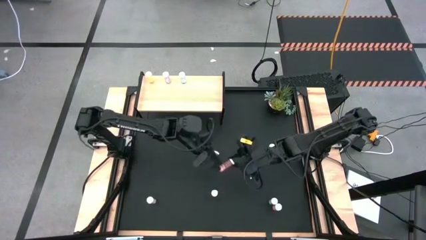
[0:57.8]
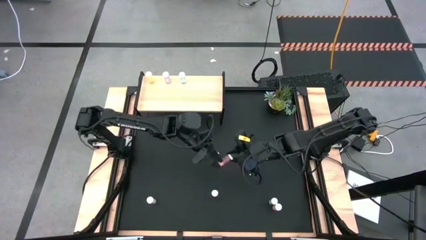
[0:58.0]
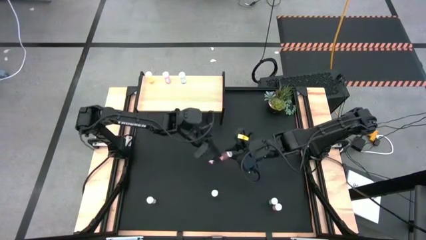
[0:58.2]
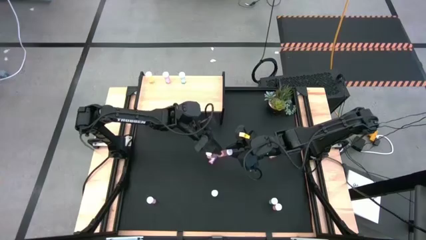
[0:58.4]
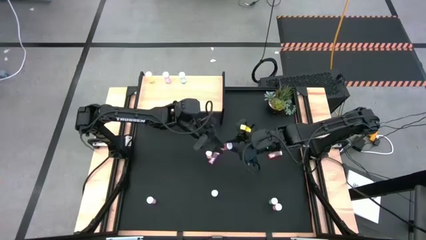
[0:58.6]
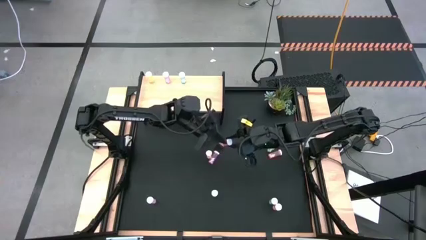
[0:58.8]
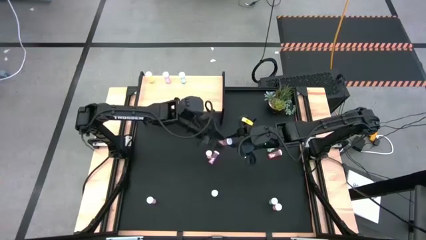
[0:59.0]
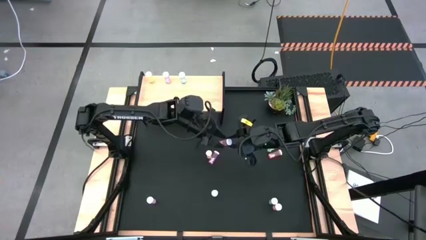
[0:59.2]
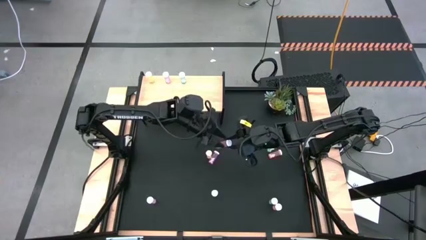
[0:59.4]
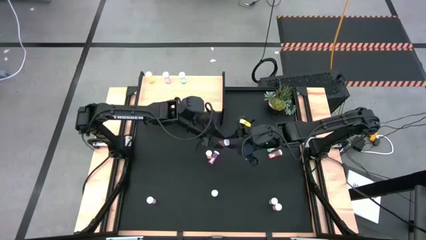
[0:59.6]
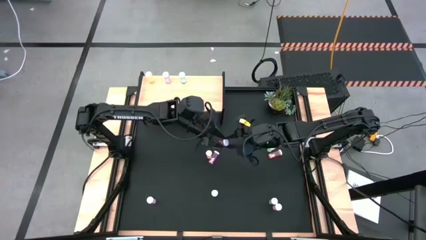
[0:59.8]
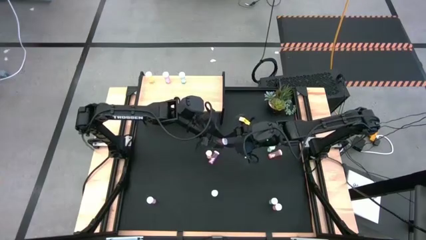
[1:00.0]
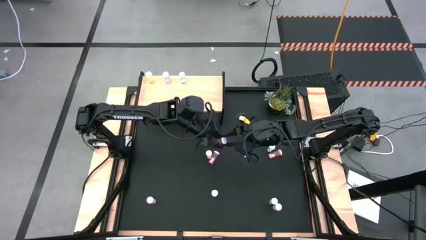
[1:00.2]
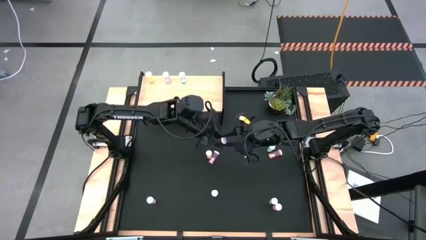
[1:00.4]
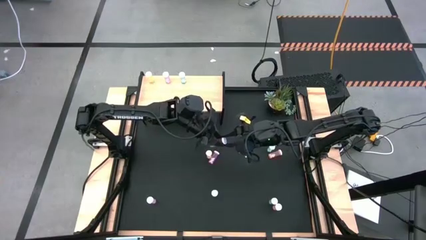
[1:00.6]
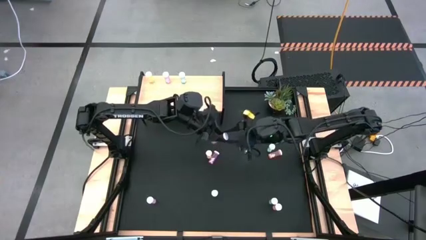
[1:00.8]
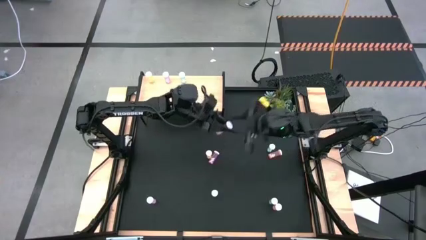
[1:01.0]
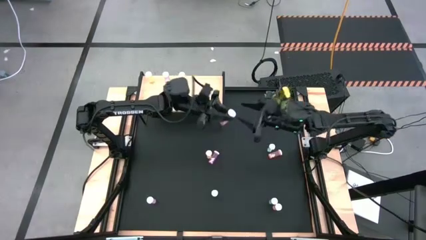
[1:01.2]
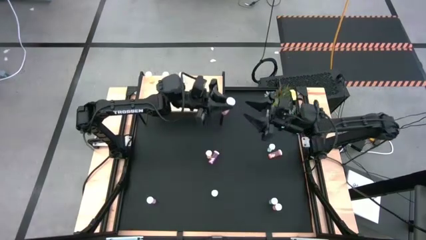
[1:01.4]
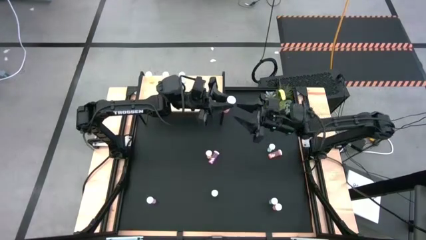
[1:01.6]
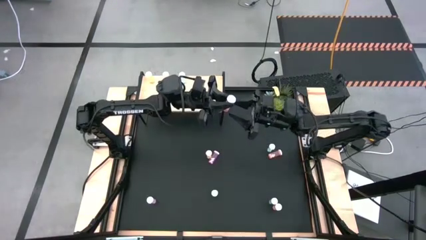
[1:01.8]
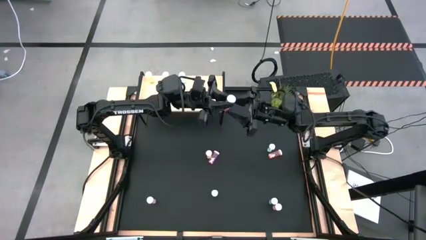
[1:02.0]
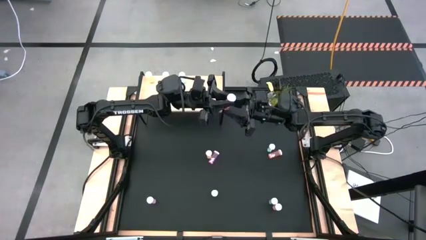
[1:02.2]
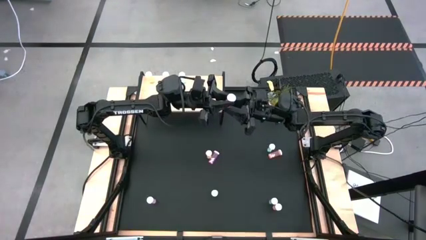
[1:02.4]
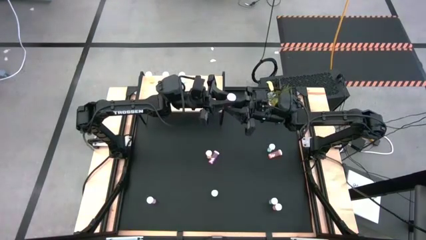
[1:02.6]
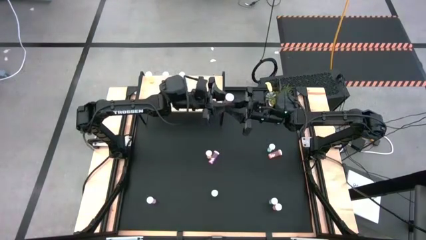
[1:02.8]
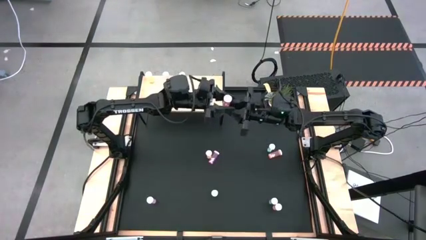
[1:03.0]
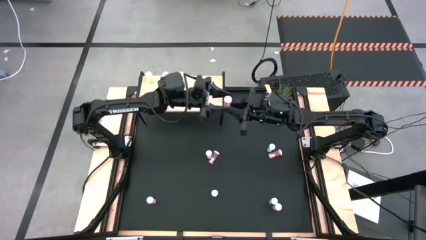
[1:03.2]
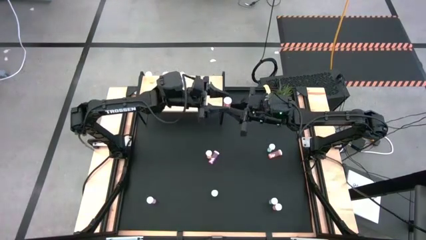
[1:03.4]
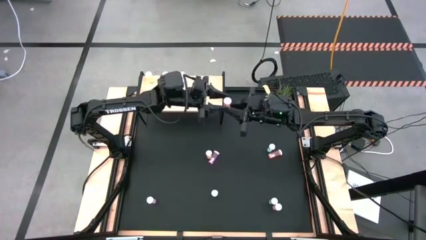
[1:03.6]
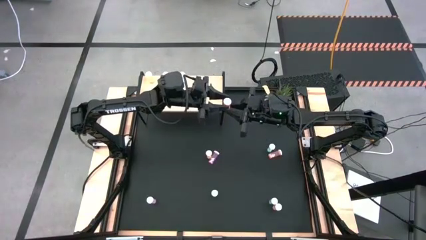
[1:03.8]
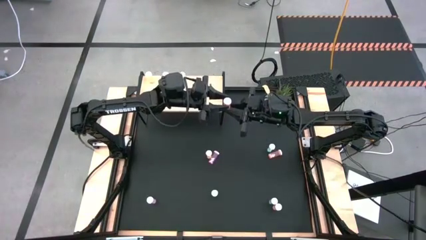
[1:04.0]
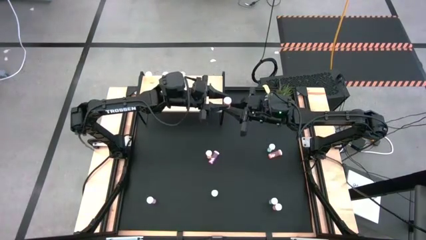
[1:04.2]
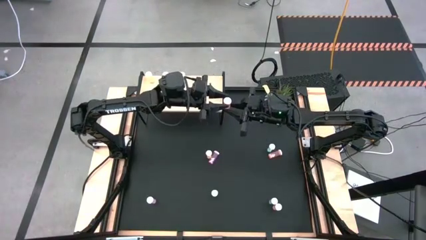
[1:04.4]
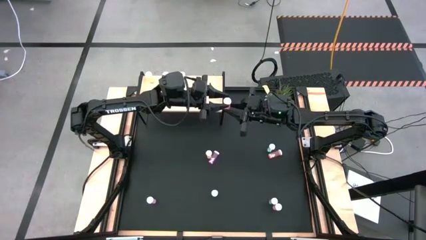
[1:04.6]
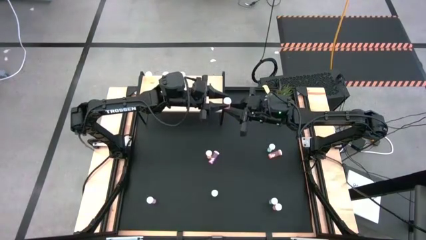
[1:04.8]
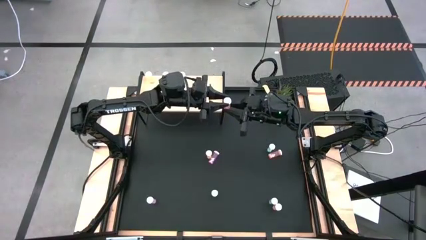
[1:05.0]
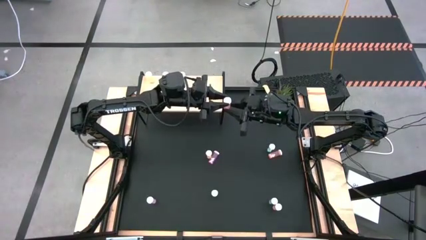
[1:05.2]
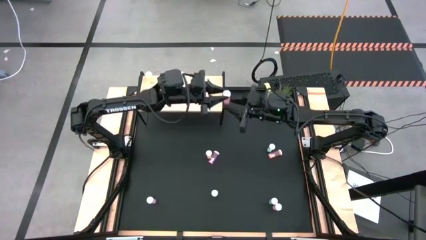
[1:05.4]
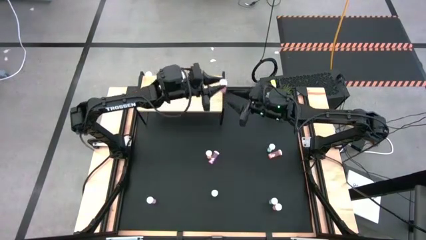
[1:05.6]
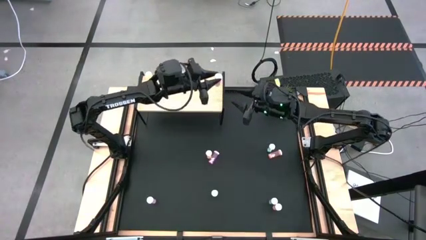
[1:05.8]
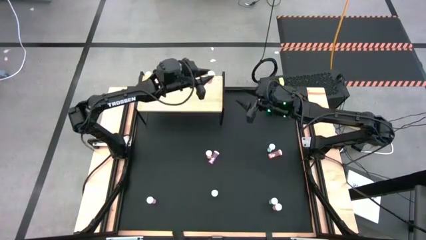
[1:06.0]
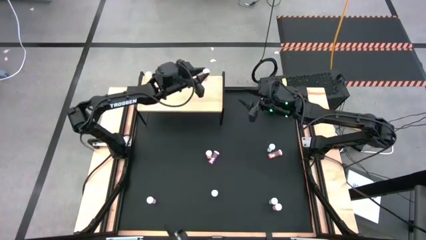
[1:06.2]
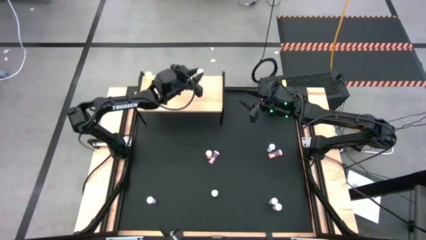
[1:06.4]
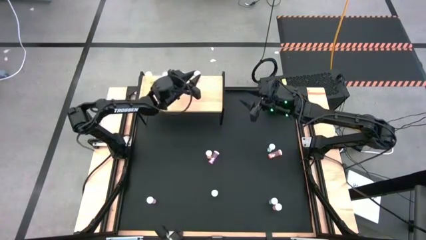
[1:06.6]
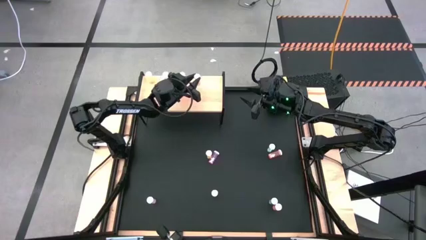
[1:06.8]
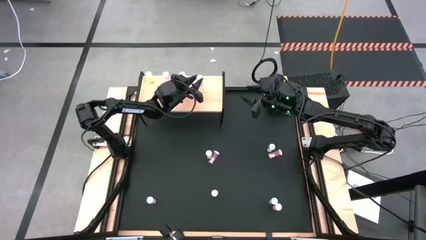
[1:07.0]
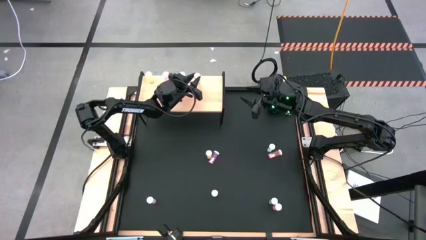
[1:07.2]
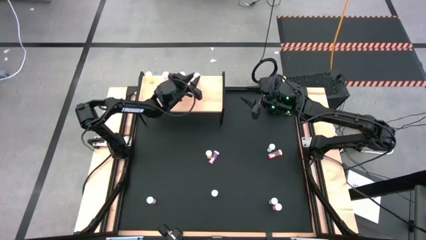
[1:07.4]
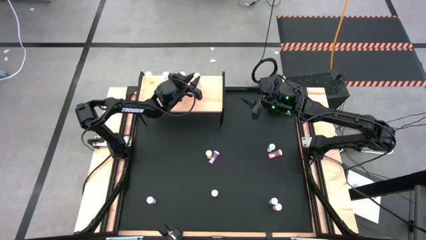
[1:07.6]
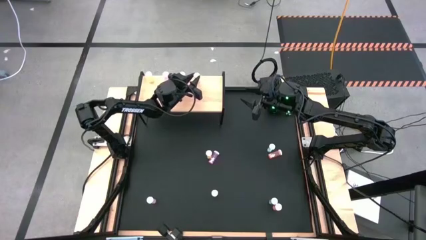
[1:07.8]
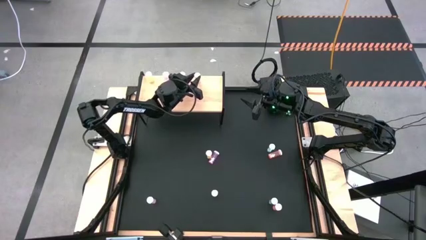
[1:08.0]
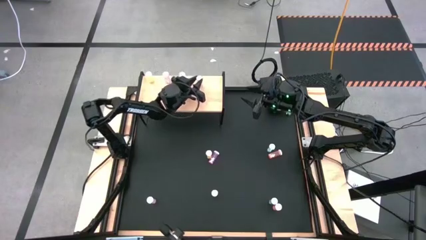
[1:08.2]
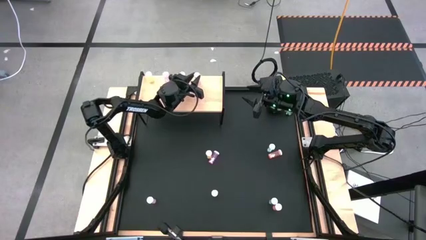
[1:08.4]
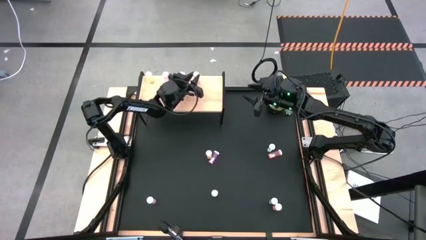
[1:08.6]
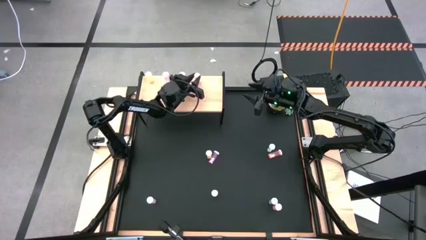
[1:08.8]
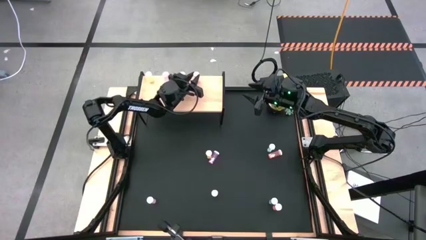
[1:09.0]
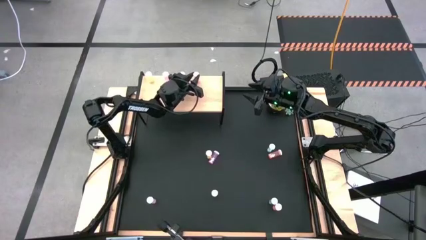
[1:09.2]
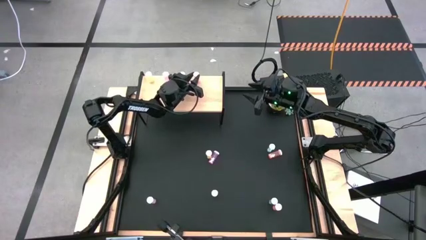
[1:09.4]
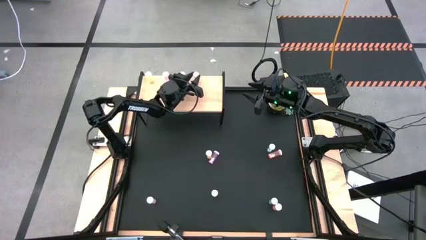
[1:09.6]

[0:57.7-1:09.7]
Task: Pick and place medicine bottles onto shelf by color
Put the bottom left orange medicine bottle on the shelf

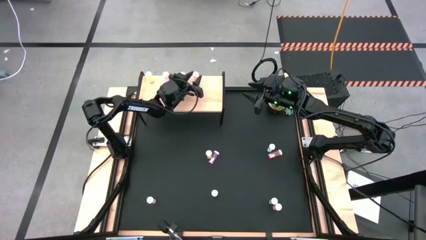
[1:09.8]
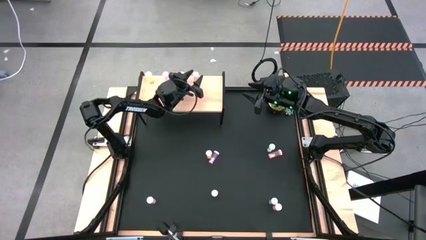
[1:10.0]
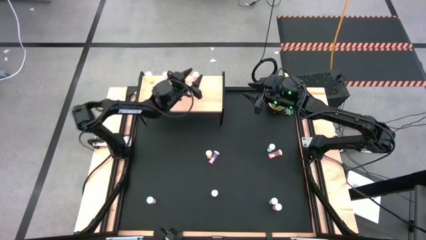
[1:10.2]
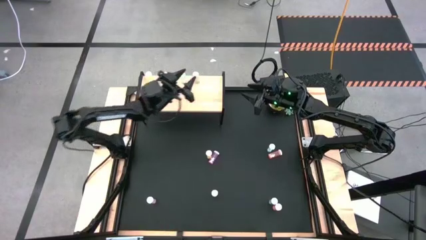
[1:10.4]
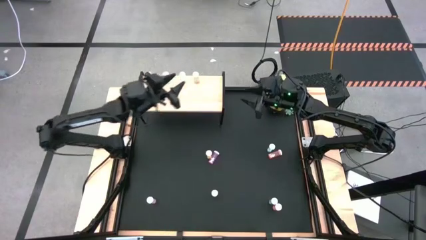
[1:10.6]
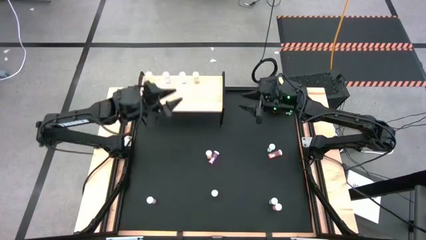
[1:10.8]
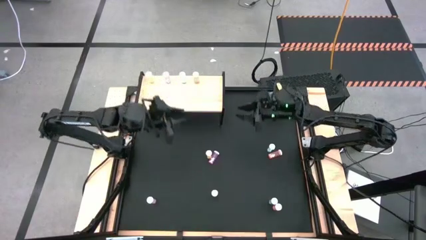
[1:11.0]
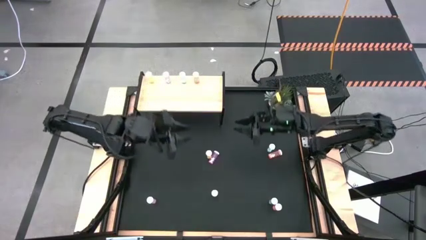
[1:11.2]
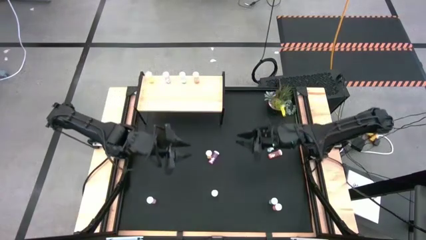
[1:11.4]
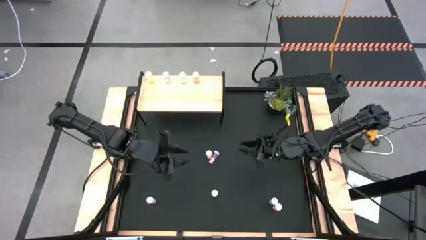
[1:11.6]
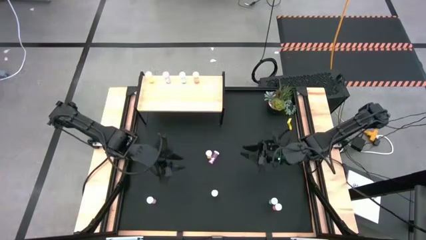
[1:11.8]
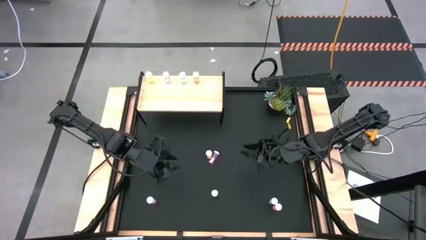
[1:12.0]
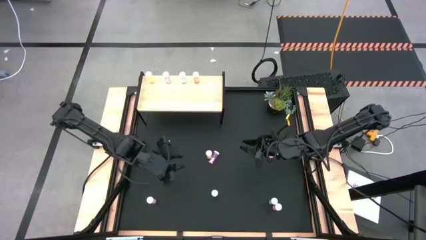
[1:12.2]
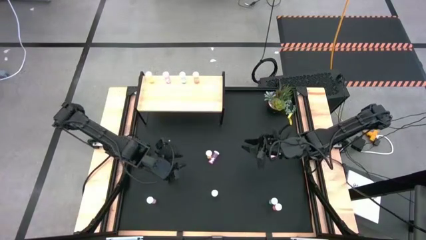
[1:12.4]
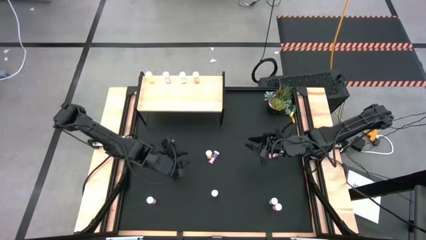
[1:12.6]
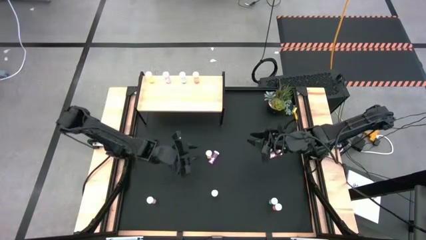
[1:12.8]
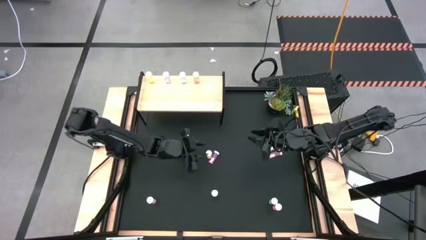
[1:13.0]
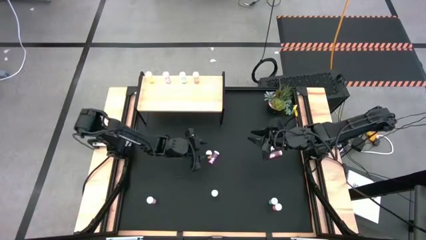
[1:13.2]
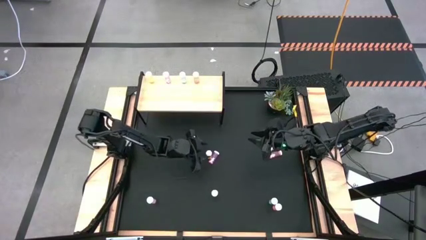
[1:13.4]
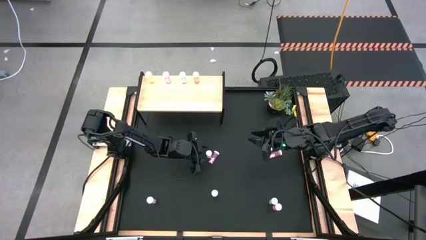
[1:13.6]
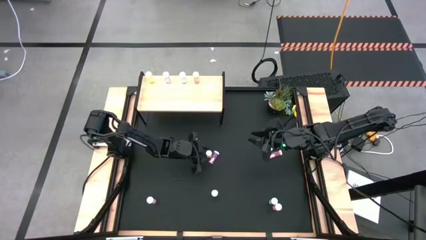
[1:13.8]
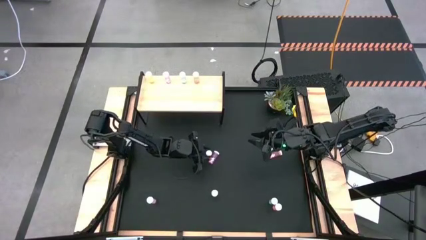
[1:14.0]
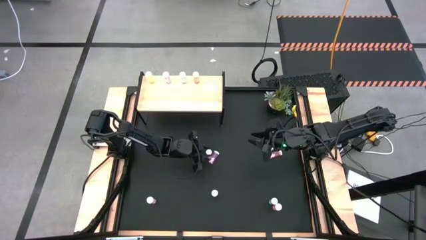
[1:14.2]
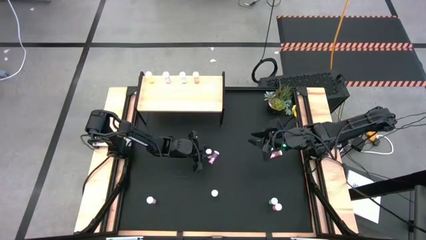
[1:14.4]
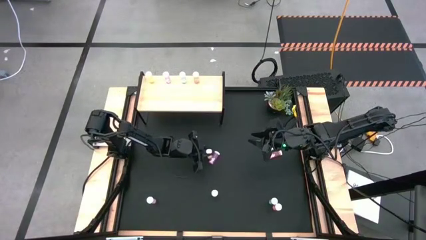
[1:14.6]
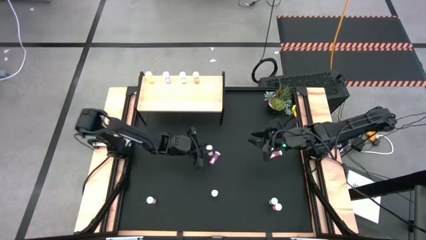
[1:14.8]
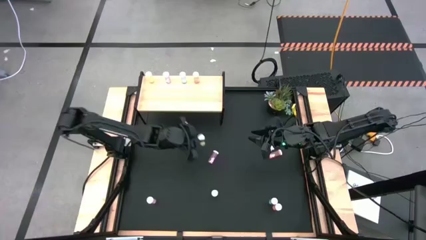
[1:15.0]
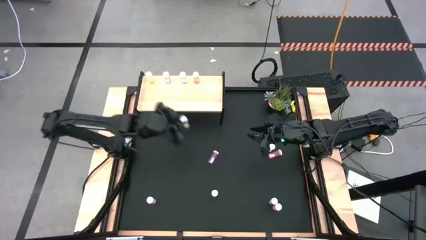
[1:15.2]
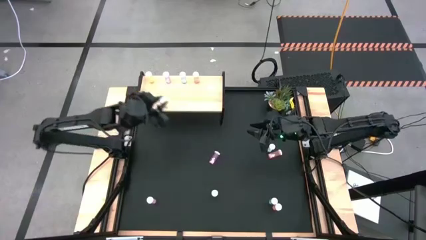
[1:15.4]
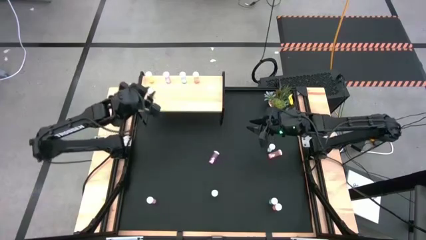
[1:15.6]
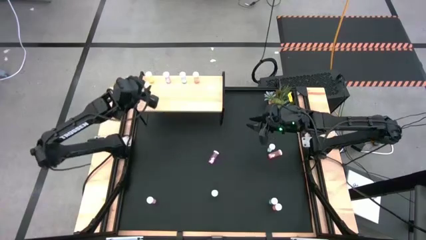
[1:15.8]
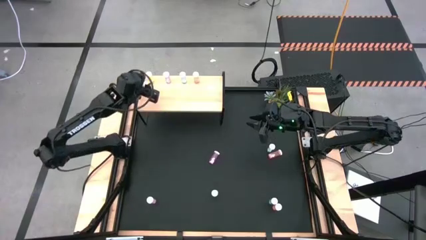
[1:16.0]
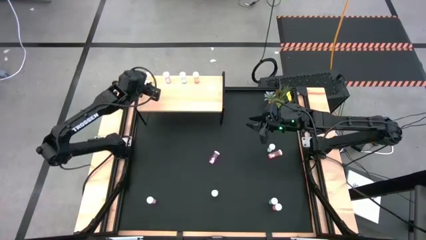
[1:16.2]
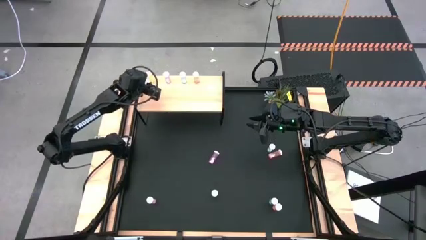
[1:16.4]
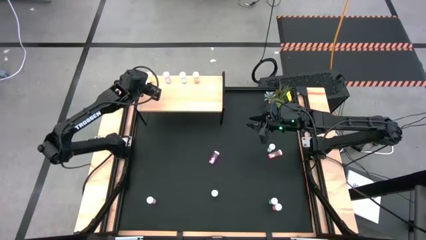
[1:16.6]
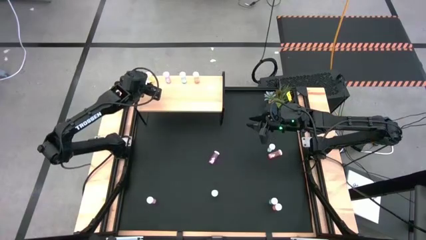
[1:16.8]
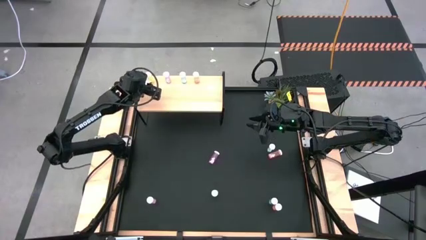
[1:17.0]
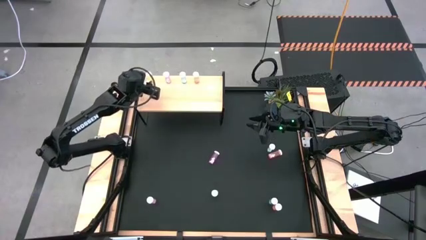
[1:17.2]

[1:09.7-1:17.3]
Put the top yellow medicine bottle aligned with the other yellow medicine bottle on the shelf
